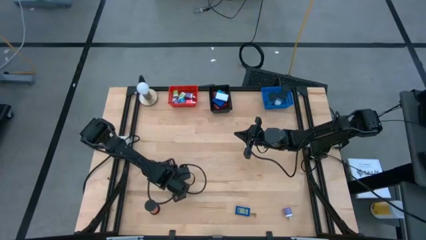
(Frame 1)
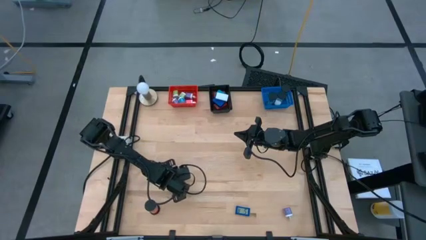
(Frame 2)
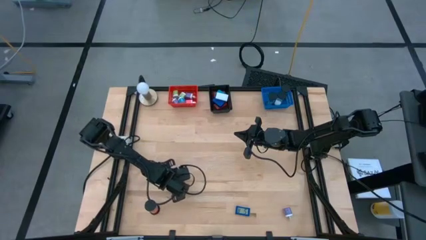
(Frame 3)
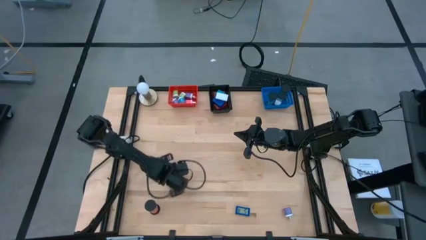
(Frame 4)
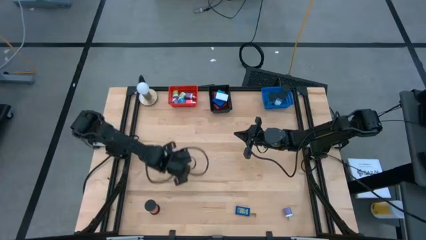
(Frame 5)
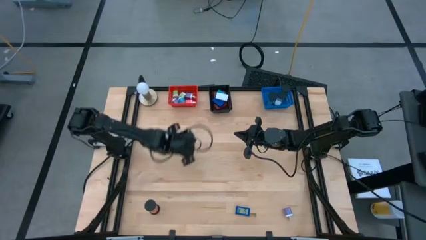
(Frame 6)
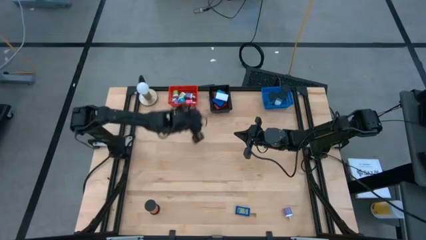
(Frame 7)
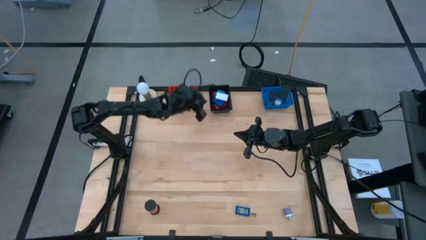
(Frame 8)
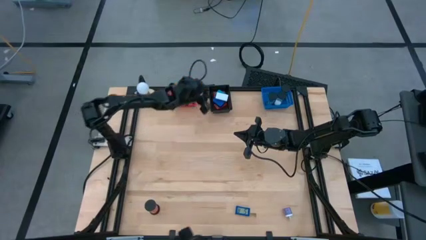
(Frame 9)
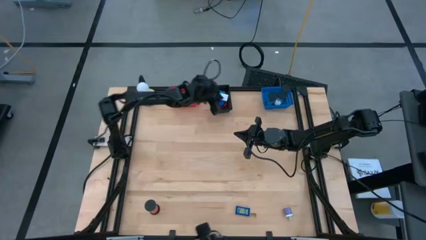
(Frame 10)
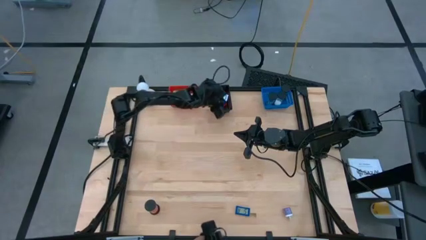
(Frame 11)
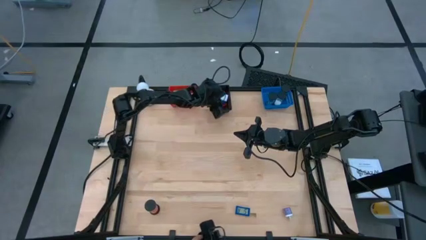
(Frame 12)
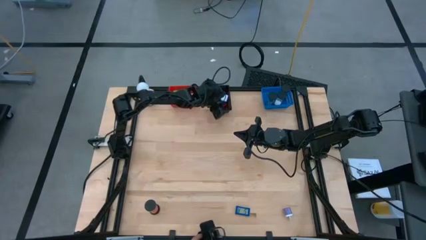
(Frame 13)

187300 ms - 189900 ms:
Task: Pick & Place Office items
Put the black digital timer into the black bin

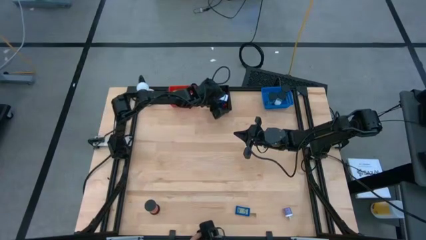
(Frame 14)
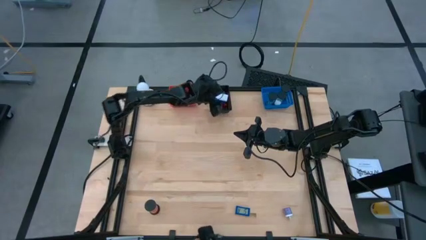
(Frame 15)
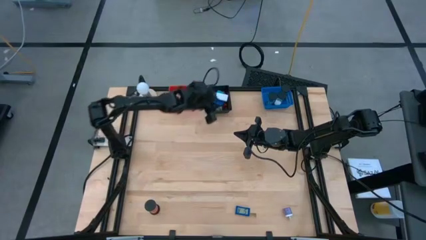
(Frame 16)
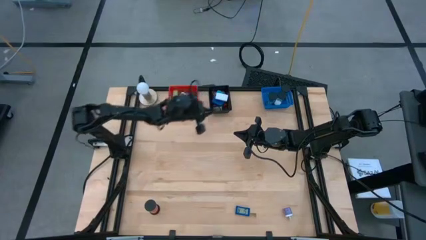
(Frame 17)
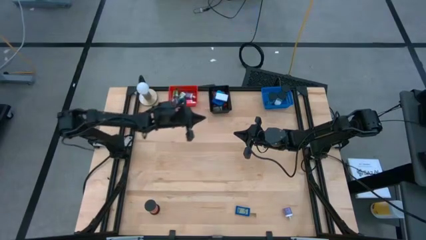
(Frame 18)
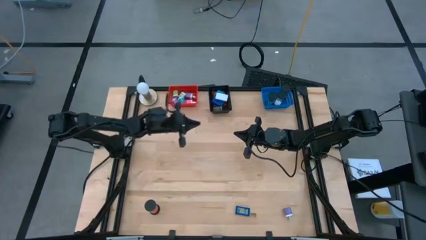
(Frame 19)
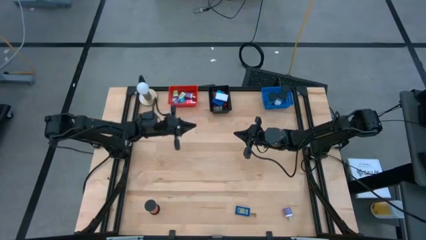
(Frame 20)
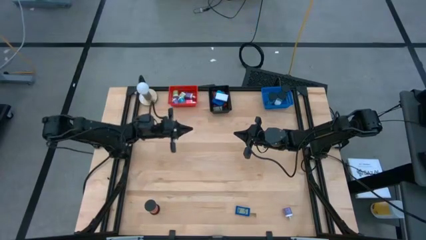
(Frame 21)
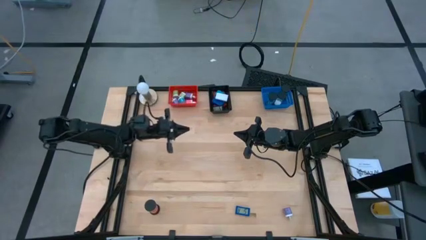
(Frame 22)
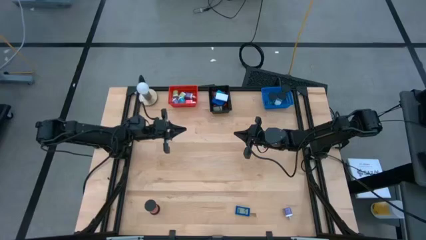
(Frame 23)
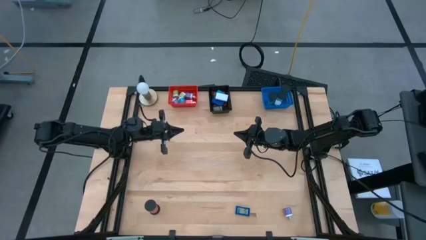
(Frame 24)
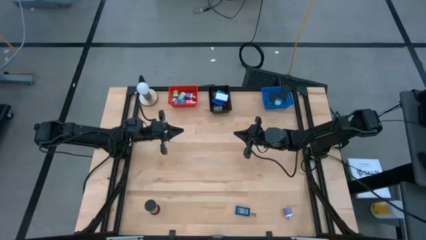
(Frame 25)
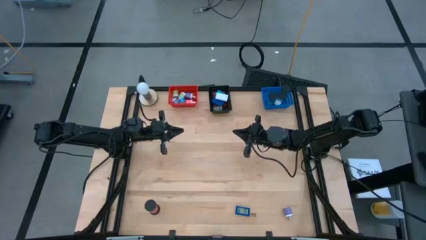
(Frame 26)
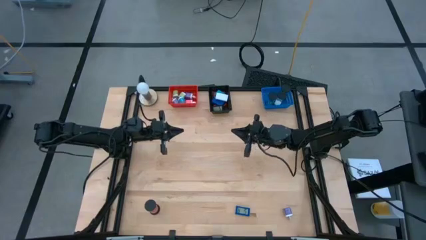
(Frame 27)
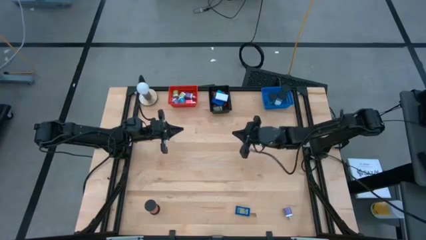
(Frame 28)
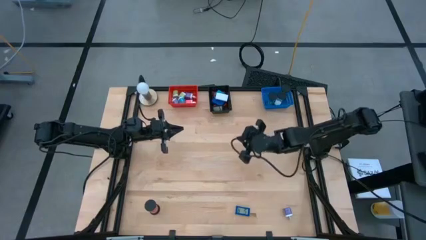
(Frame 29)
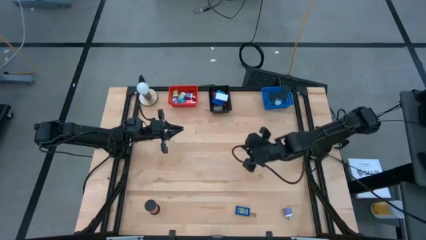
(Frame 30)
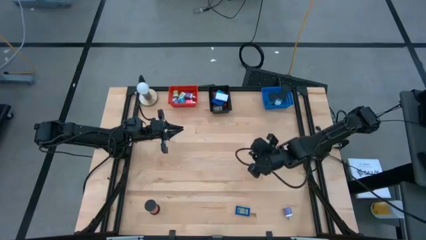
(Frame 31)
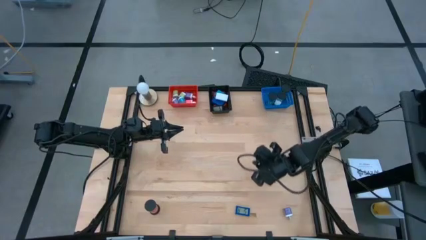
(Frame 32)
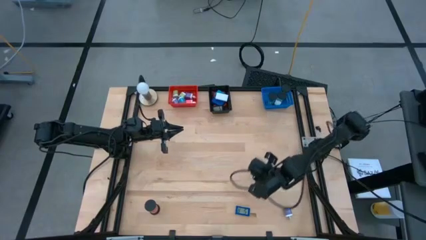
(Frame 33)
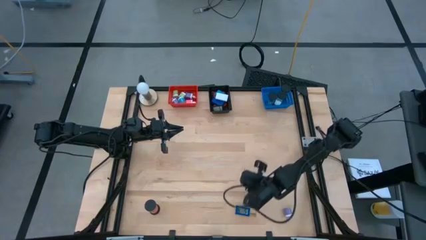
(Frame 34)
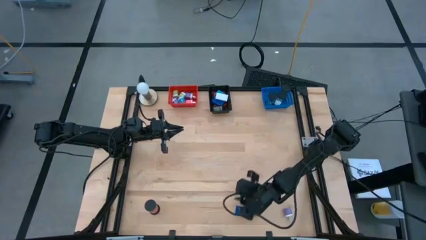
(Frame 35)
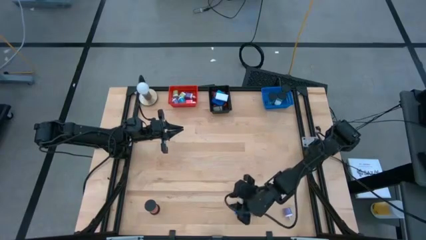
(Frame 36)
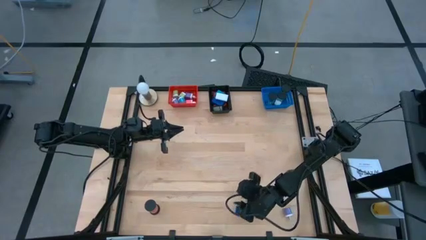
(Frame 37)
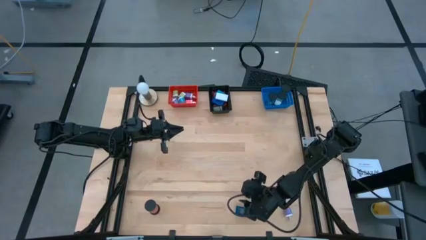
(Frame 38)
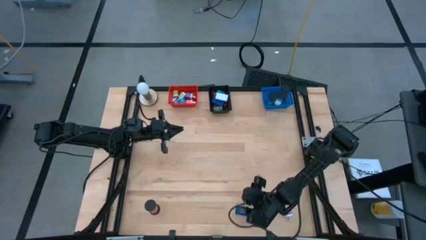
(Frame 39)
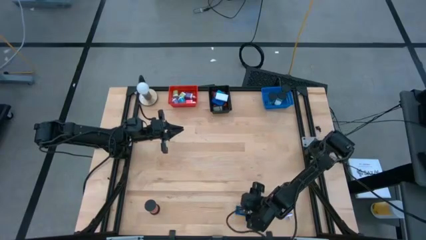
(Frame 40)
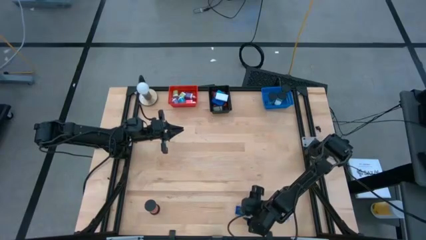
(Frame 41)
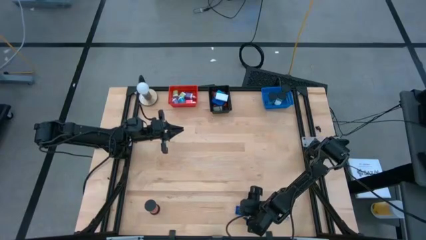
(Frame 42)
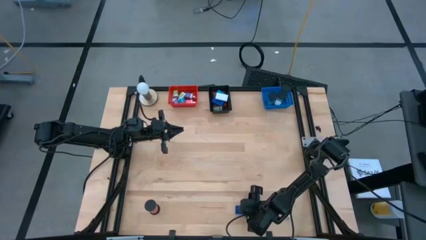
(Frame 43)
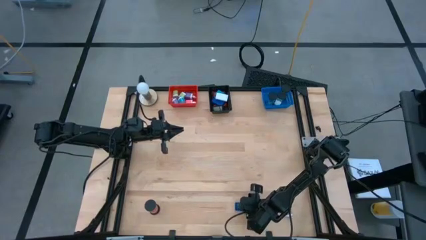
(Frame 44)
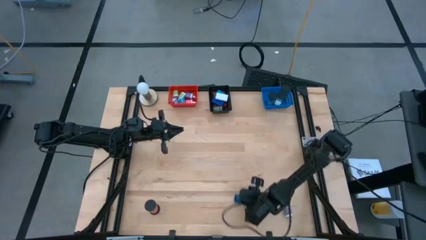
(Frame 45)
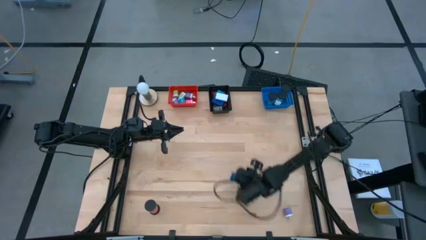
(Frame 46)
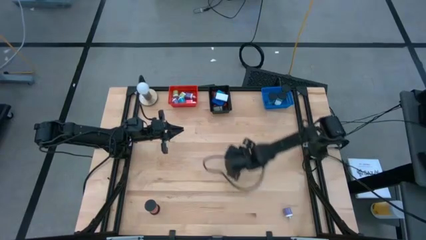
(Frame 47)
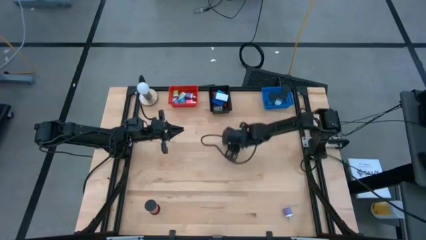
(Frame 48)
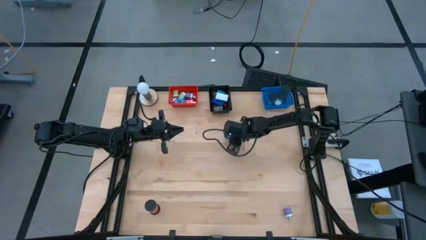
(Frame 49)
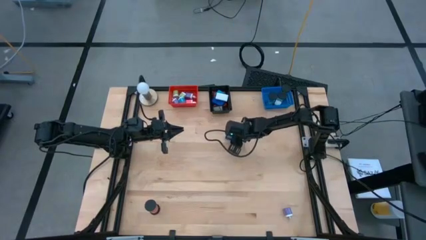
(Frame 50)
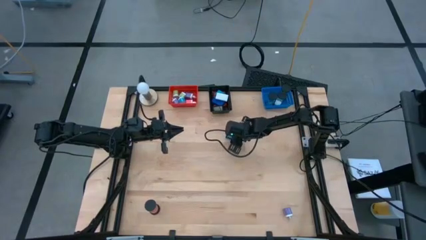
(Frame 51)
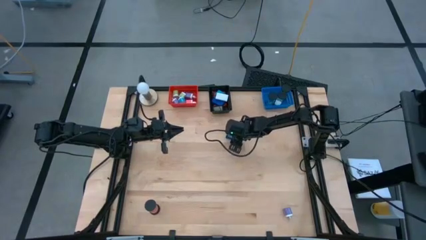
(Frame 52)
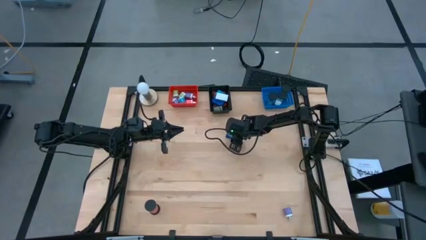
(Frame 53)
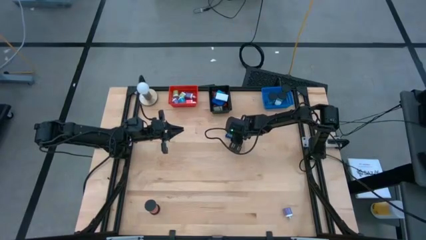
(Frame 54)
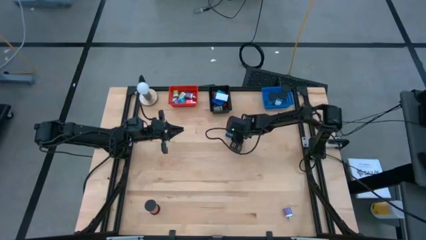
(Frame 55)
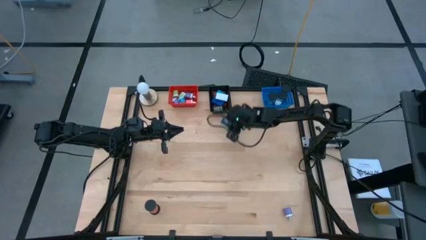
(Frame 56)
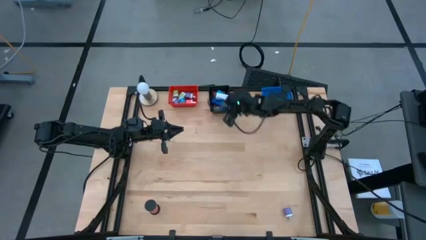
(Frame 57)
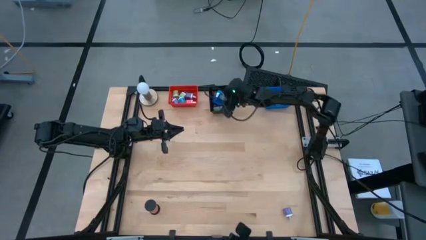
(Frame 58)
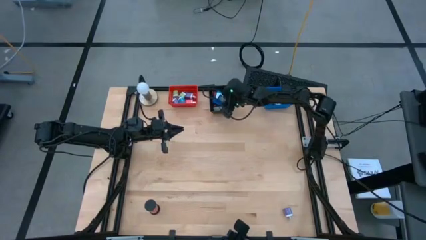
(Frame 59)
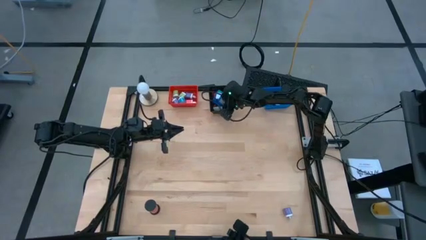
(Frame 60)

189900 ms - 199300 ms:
Put the blue digital timer into the black bin

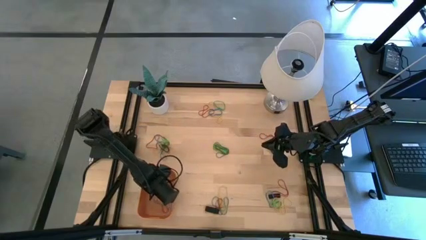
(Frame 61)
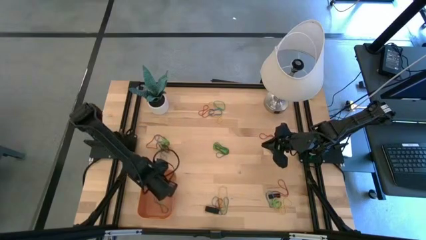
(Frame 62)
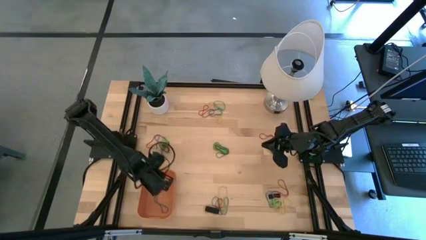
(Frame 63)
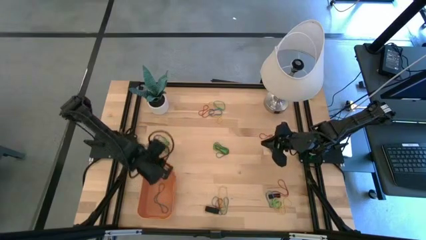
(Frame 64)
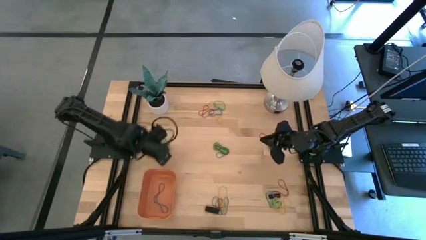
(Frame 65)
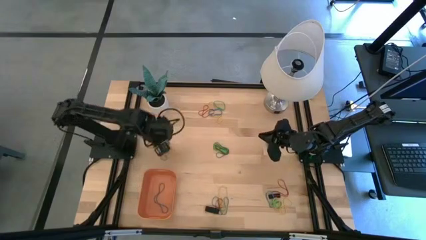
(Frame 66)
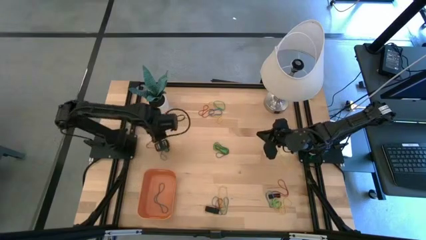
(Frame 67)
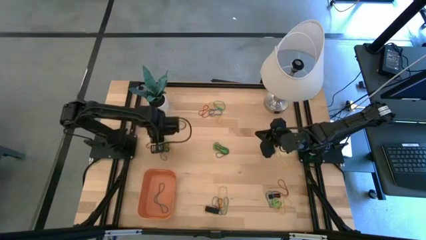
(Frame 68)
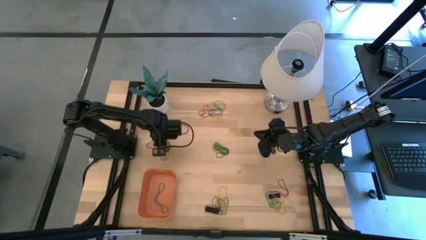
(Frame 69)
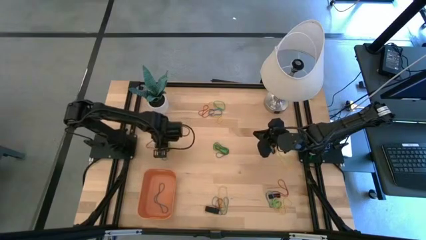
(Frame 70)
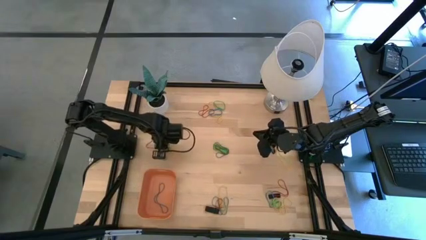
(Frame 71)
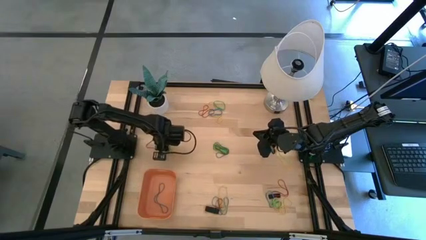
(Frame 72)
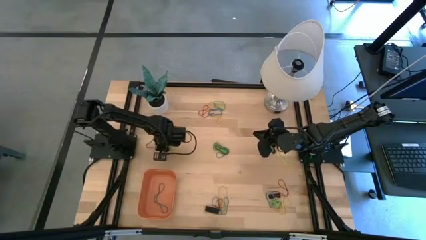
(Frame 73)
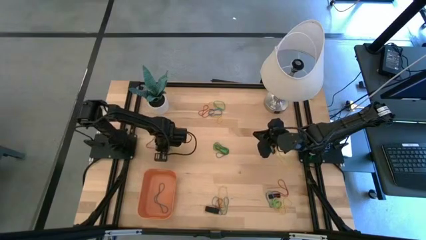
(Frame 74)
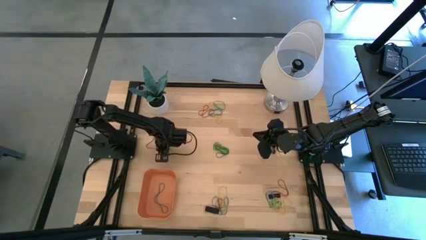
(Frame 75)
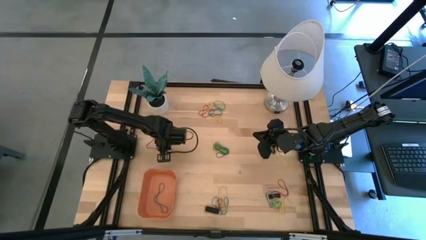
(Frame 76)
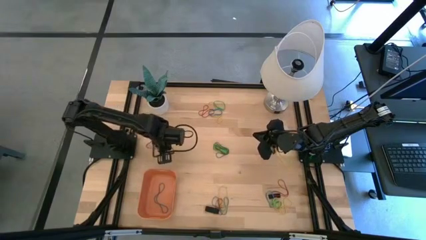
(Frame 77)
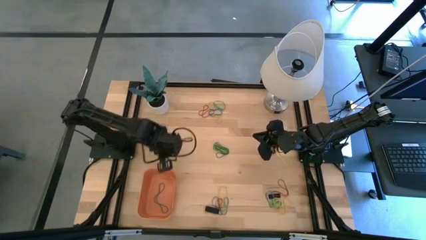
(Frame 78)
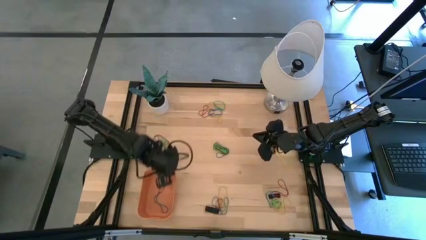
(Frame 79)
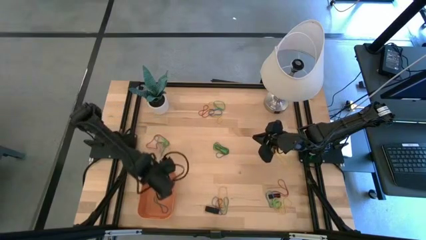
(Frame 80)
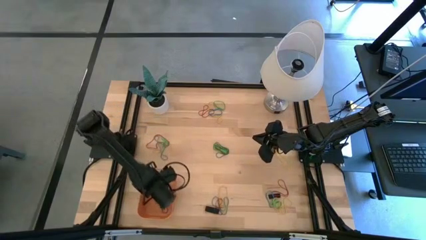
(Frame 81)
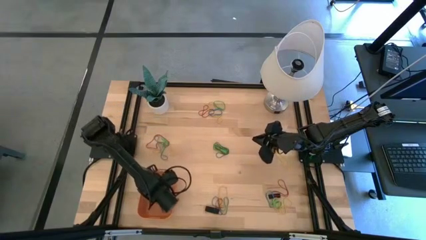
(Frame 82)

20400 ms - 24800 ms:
Task: Pick and place rubber bands into bin
Put the black rubber band into the orange bin
